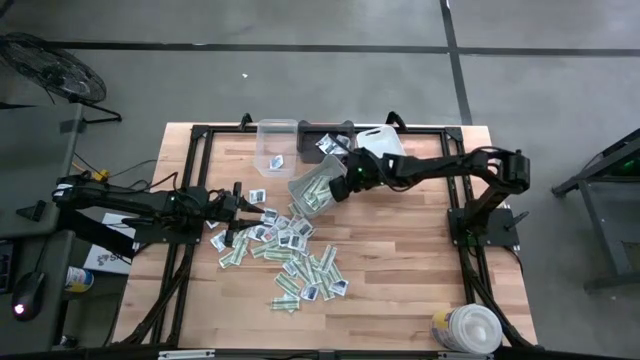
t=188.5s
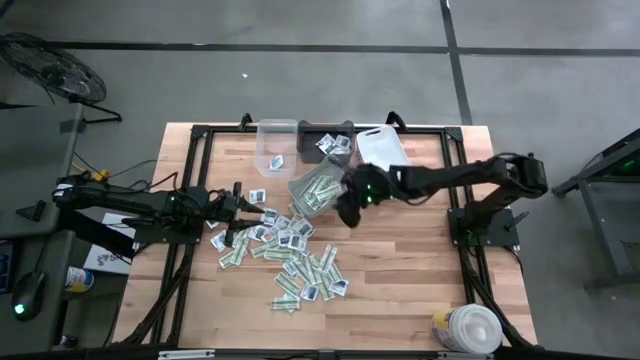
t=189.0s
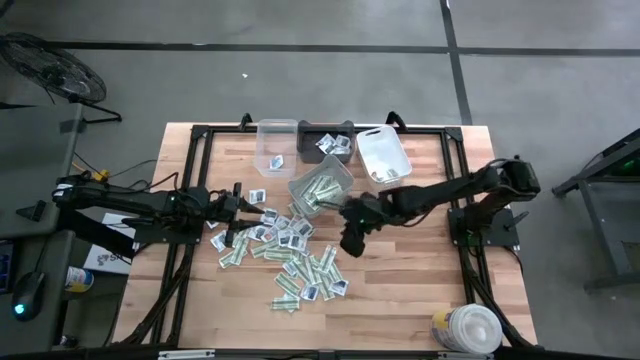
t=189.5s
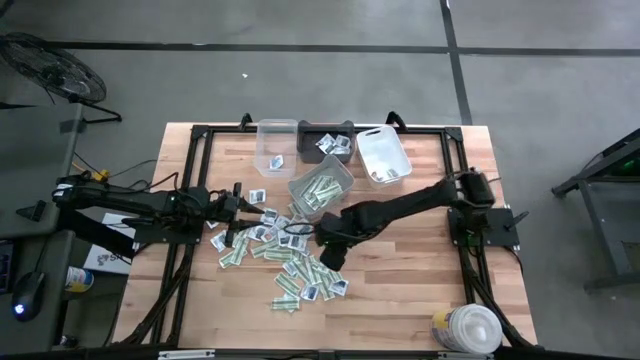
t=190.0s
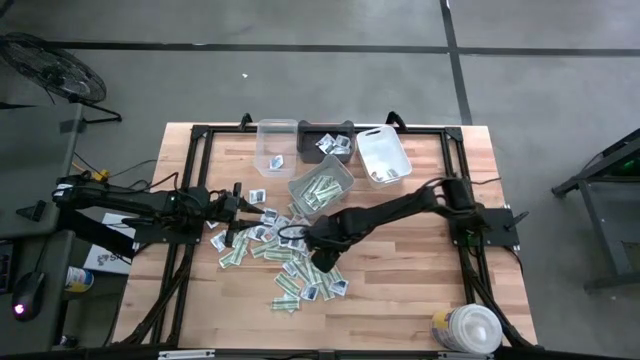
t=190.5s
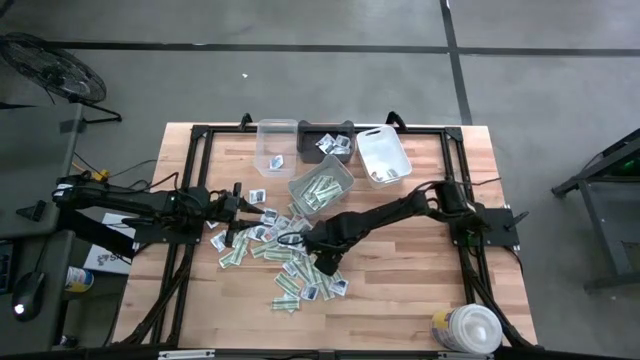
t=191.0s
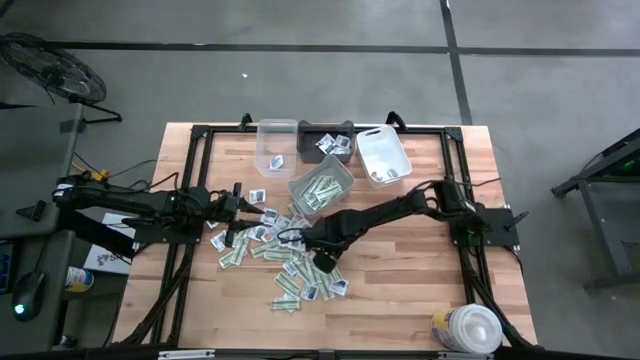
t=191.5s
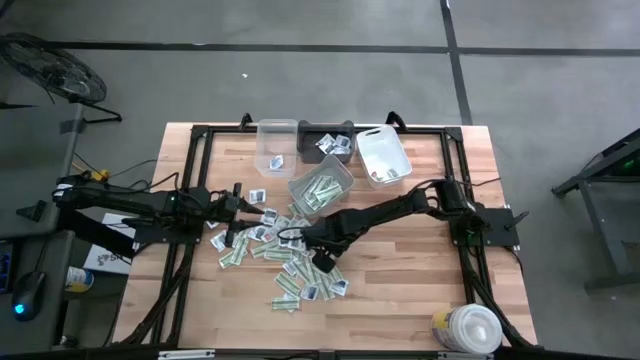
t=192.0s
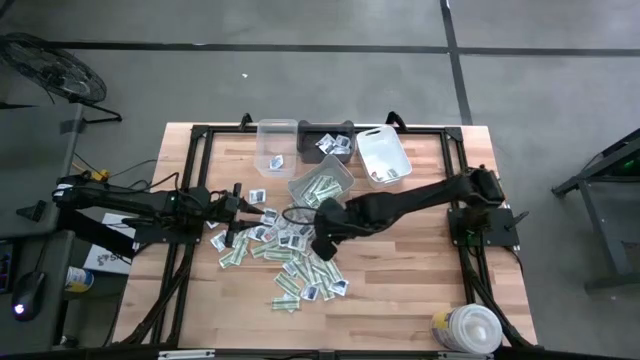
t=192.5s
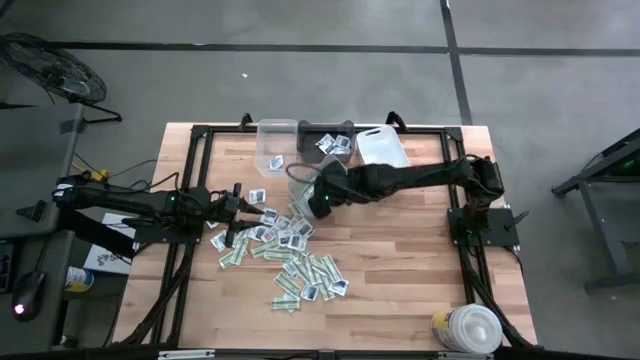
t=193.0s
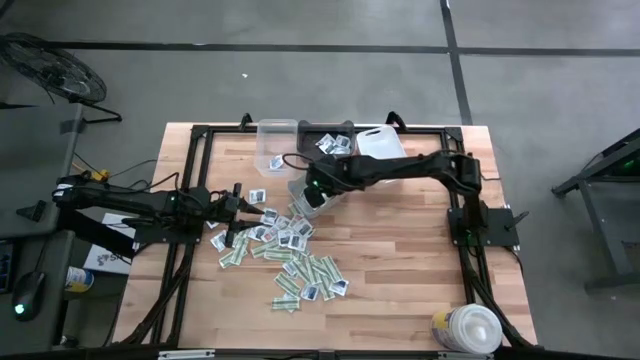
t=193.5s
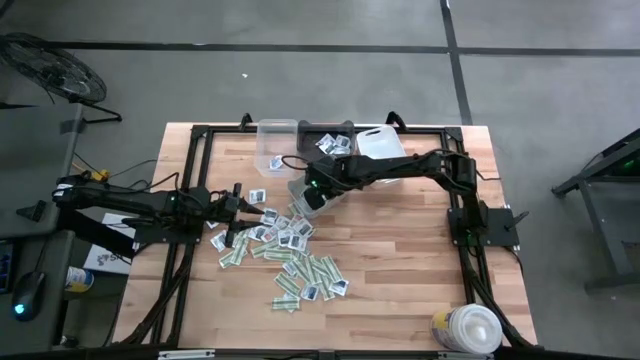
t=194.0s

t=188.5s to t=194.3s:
Task: Pick & Place First Aid Supplies
Put the bandage pack into the gray bin

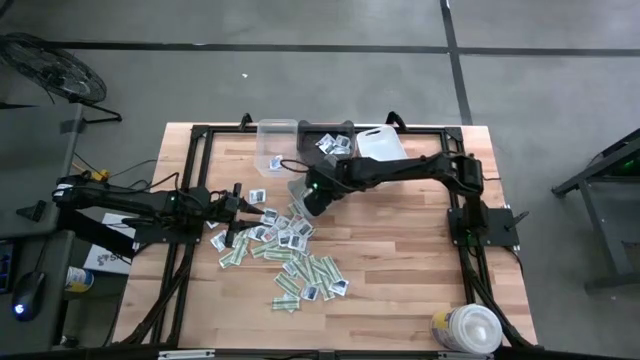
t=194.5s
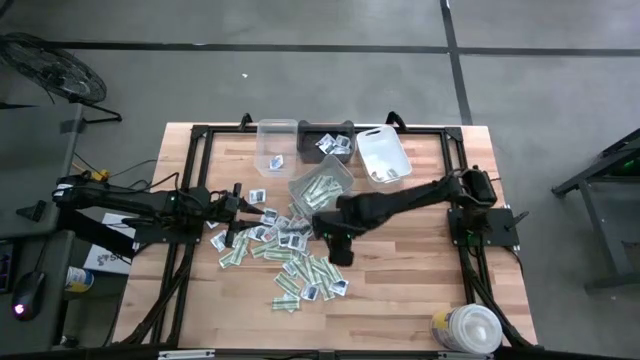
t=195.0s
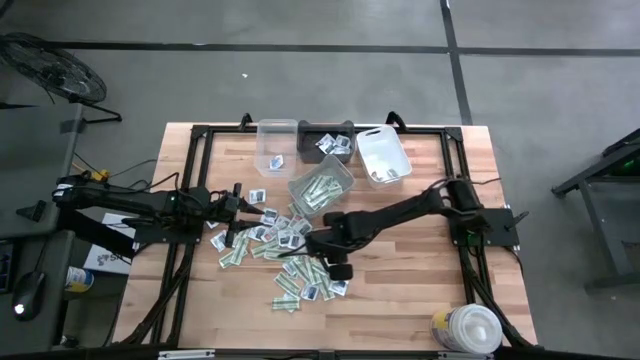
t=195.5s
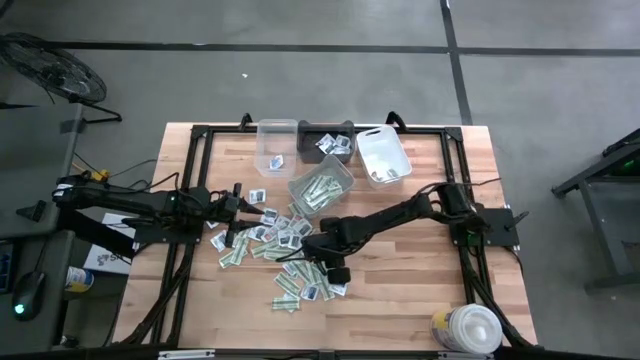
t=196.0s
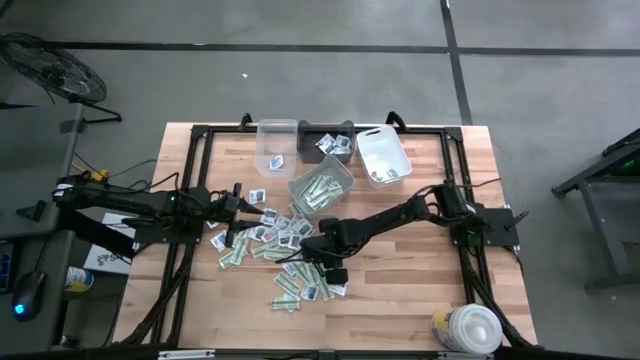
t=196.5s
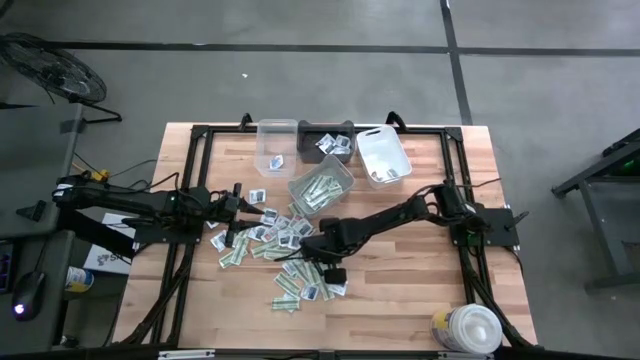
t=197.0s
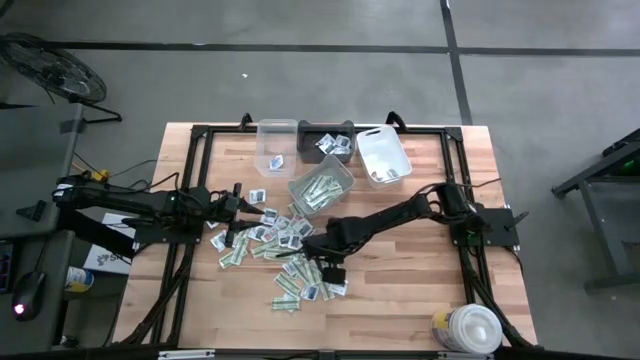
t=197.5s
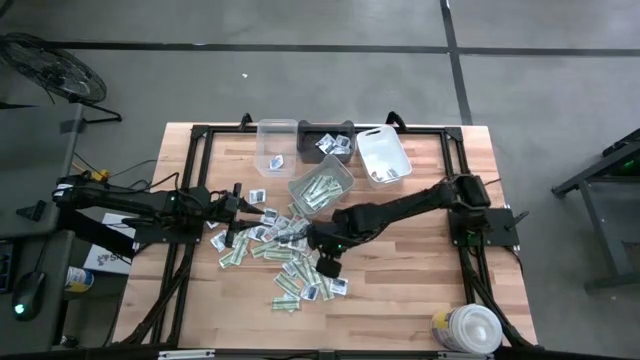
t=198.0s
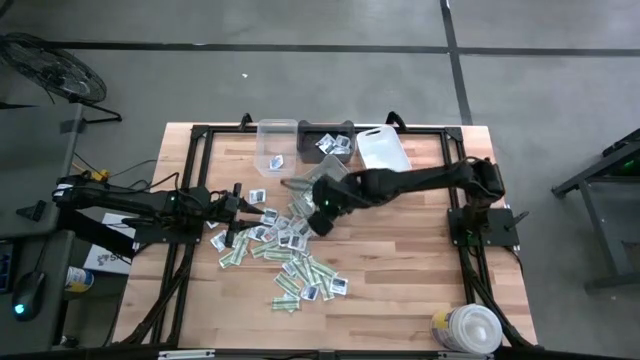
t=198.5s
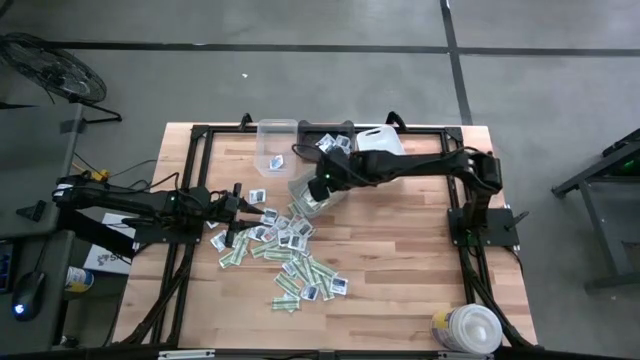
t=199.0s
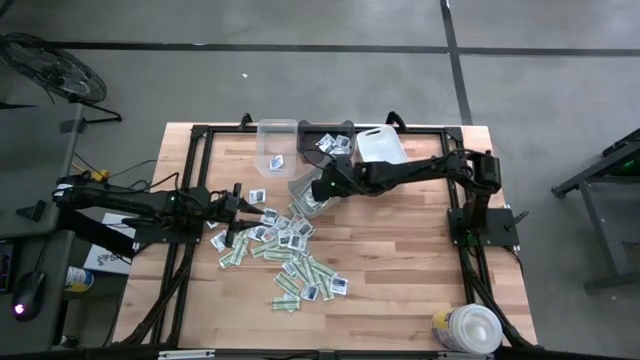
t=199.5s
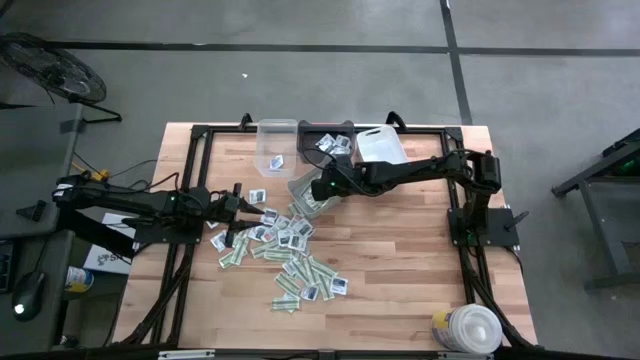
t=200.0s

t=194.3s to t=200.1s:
Put the bandage pack into the gray bin

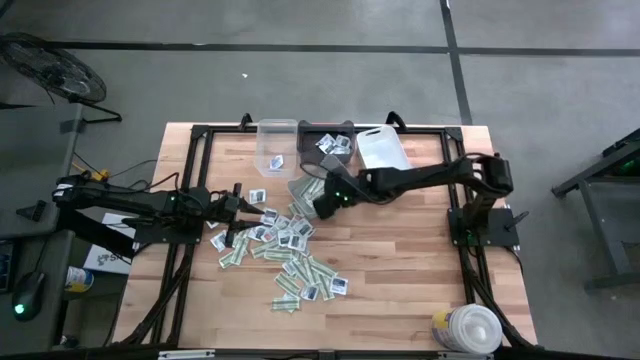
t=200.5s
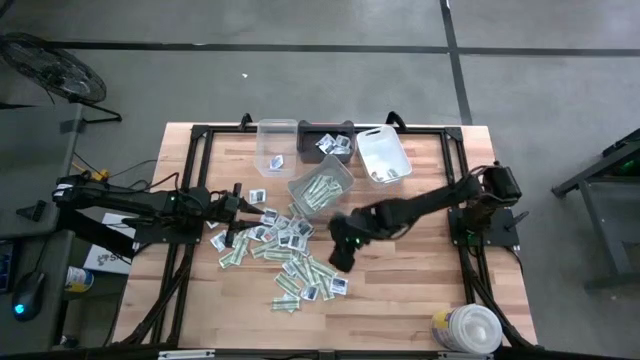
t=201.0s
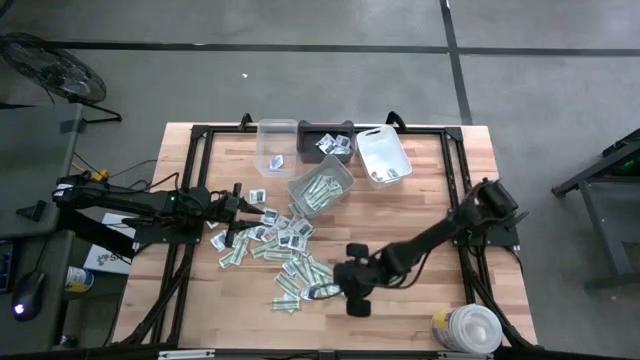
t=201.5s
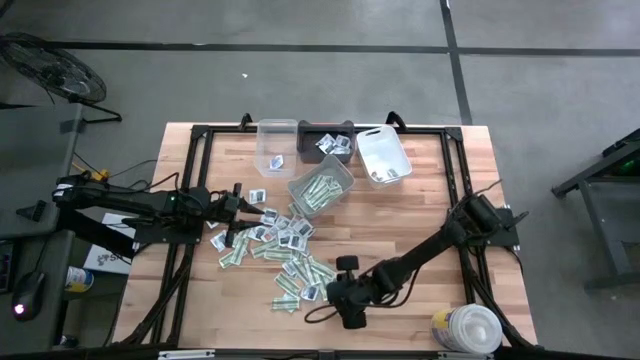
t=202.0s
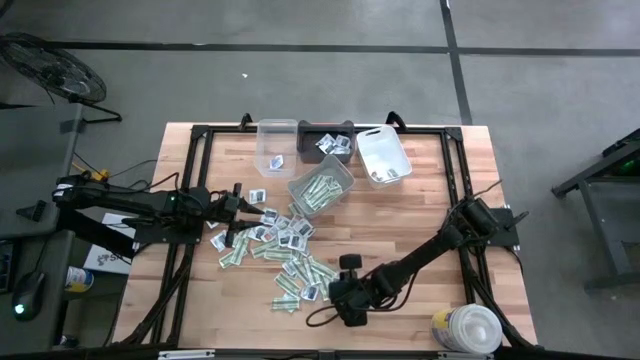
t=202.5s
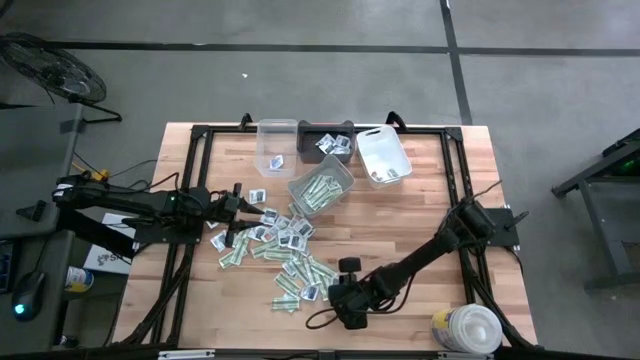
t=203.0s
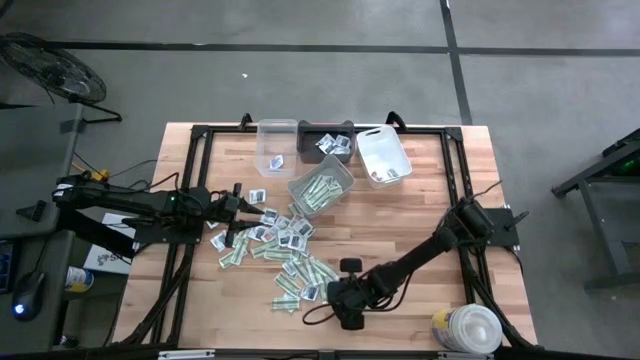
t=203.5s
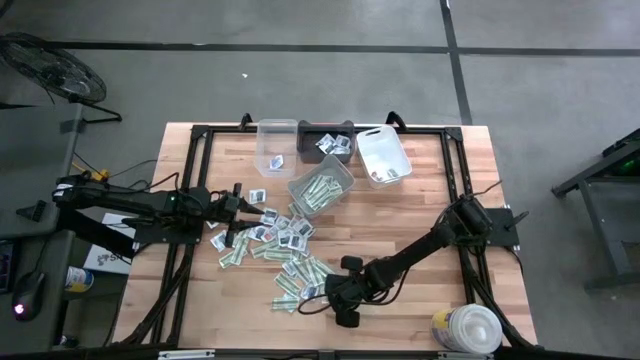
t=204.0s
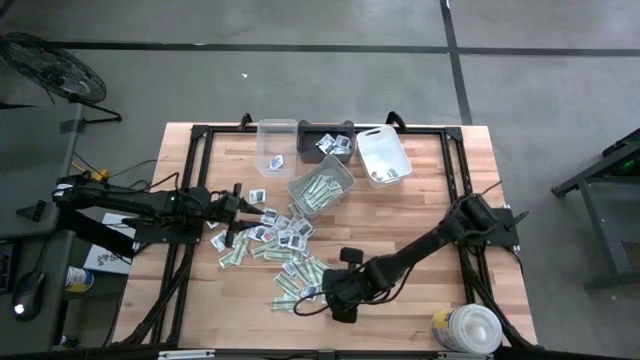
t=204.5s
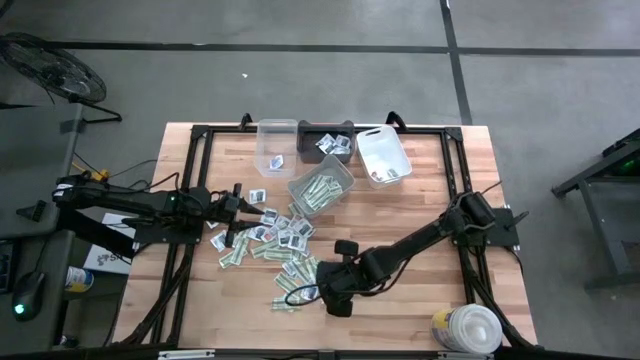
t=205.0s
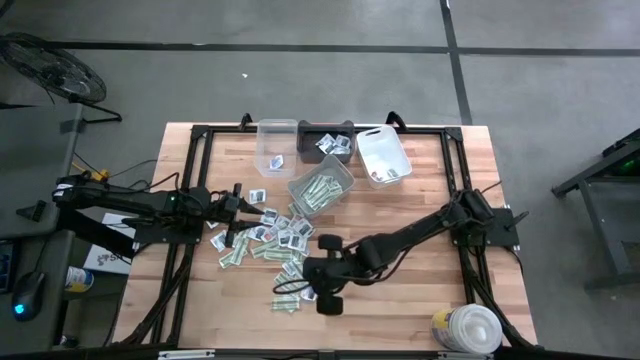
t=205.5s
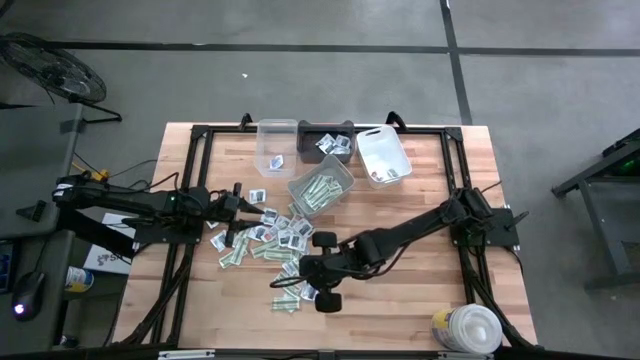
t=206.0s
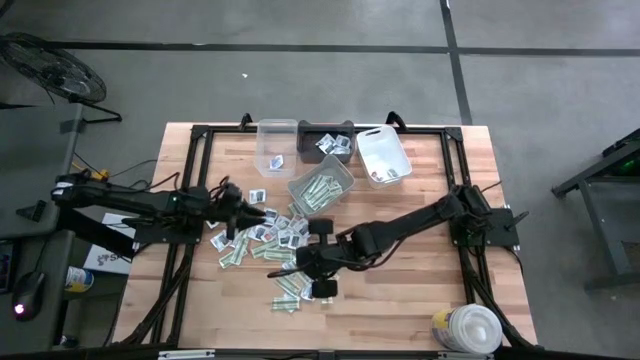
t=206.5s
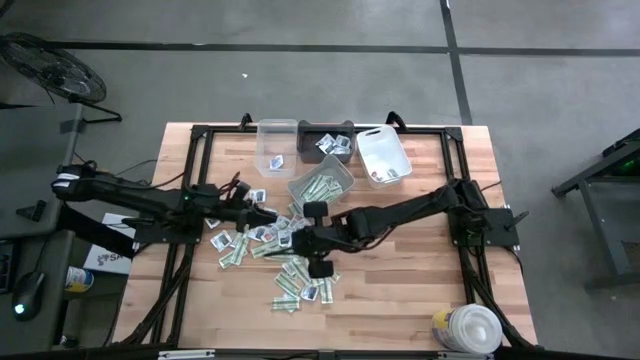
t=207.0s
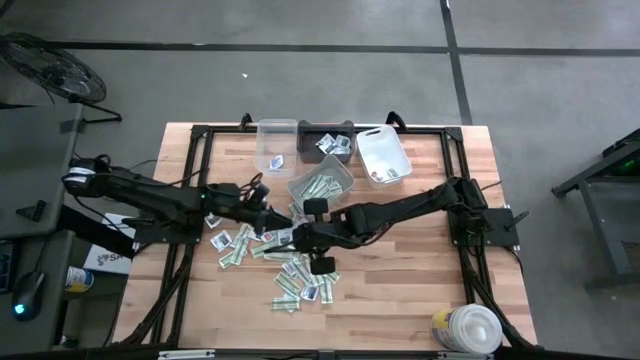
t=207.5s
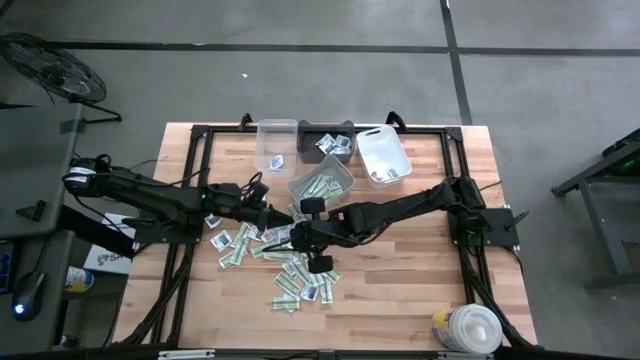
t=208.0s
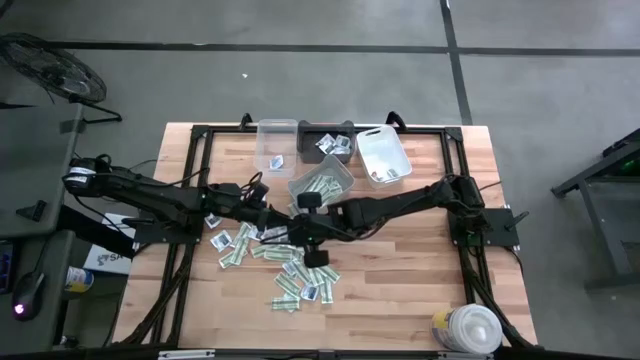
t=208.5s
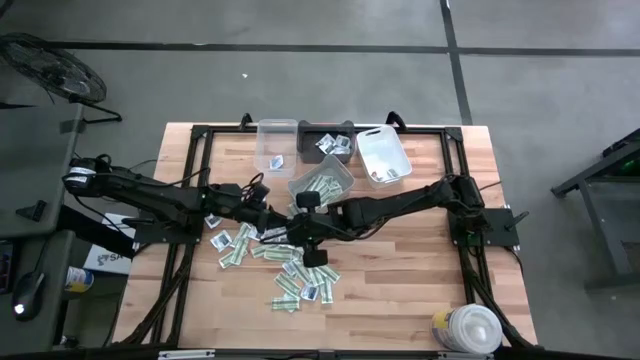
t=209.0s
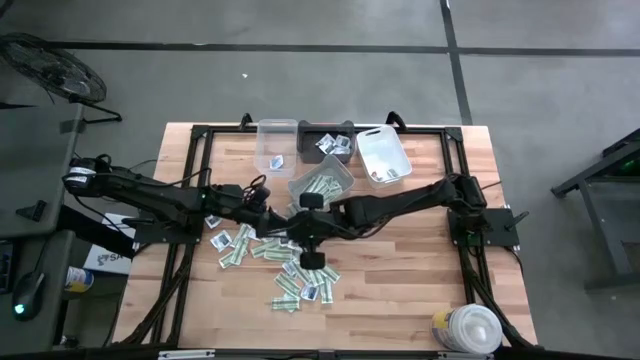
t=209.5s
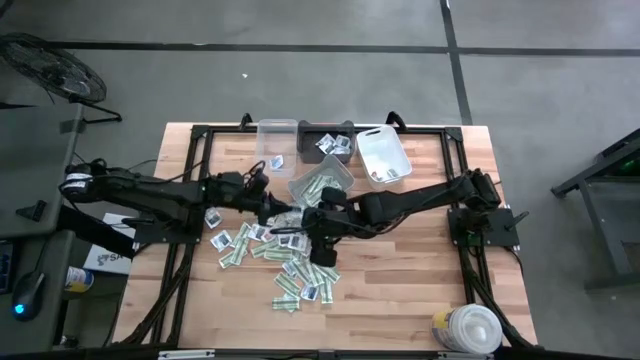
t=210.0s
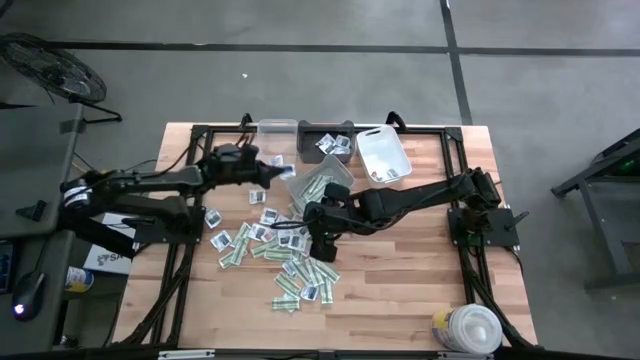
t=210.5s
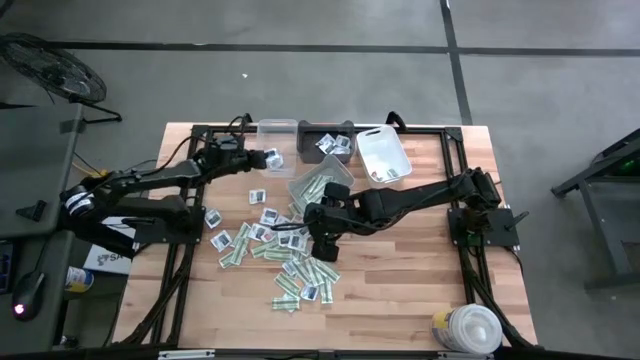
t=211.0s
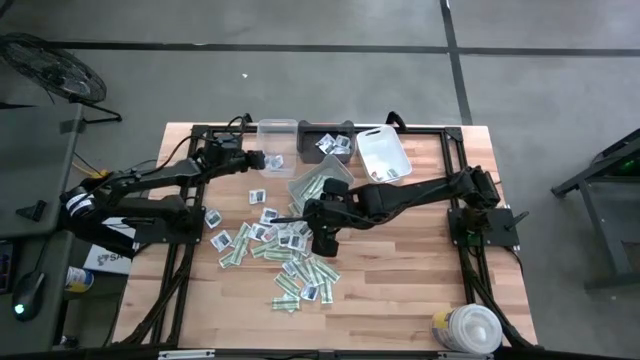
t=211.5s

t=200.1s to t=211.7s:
Put the alcohol pad into the transparent bin
